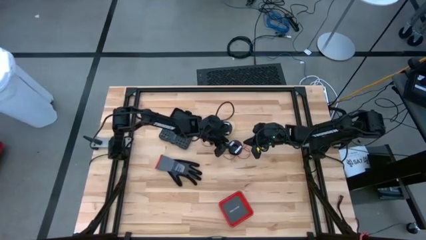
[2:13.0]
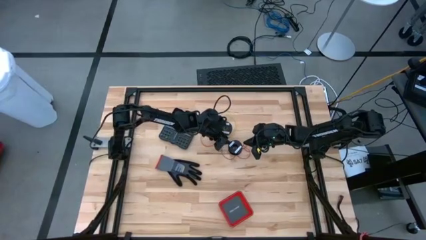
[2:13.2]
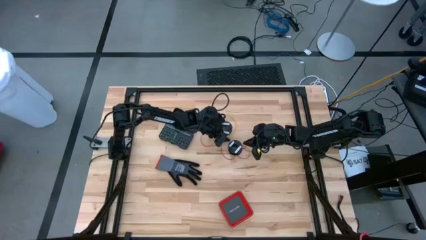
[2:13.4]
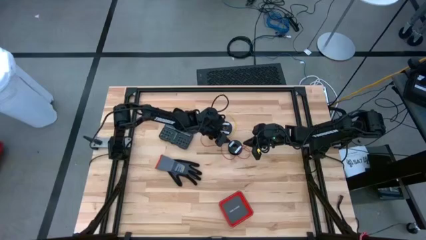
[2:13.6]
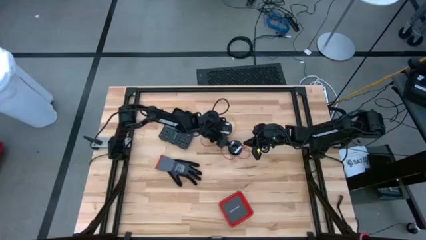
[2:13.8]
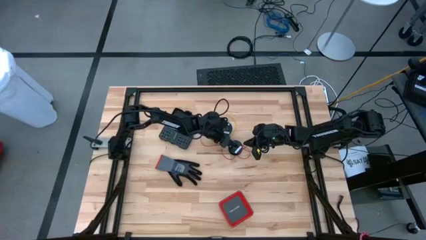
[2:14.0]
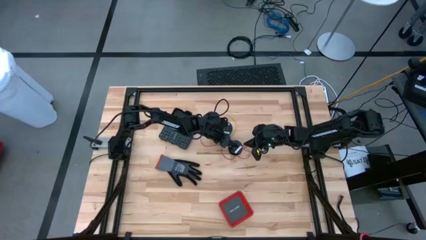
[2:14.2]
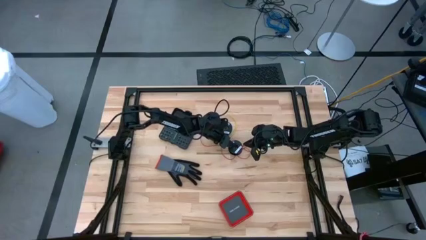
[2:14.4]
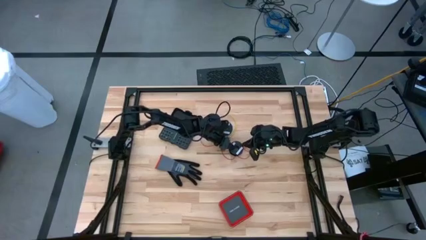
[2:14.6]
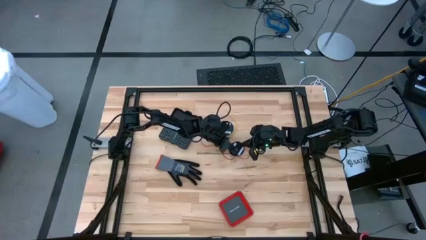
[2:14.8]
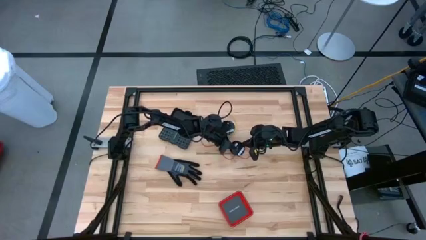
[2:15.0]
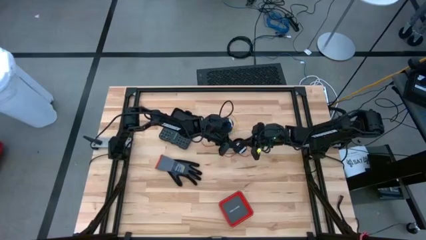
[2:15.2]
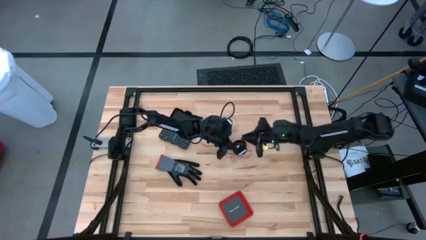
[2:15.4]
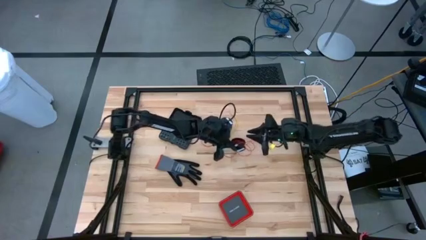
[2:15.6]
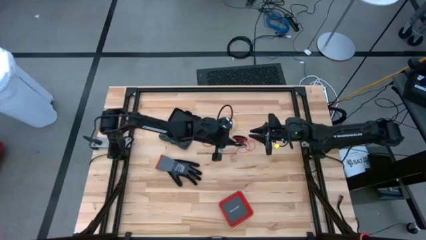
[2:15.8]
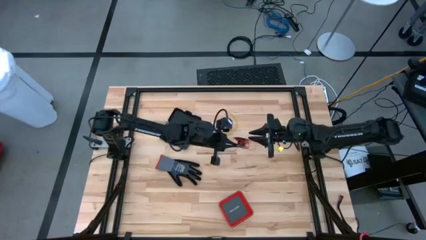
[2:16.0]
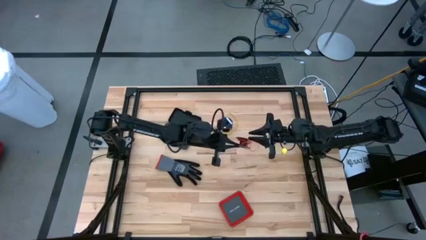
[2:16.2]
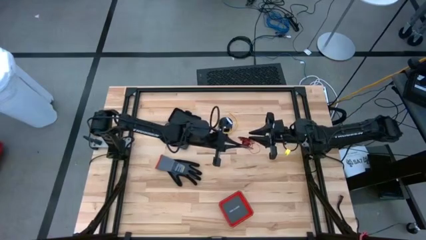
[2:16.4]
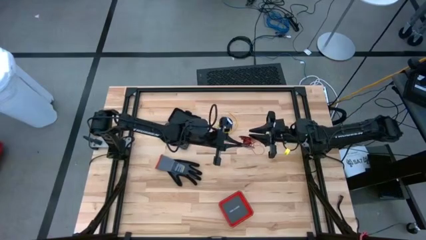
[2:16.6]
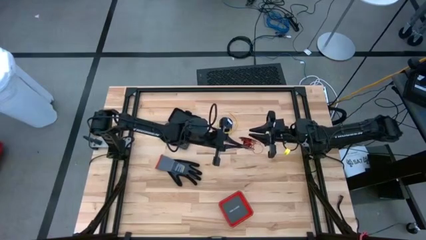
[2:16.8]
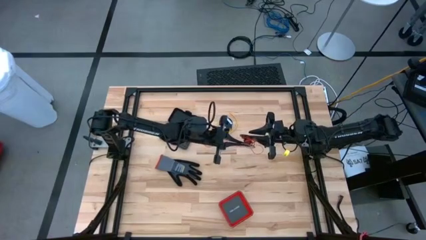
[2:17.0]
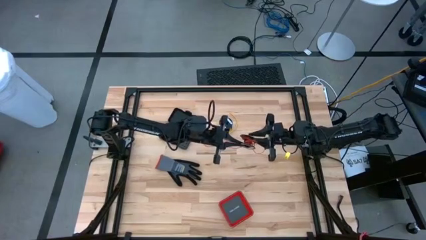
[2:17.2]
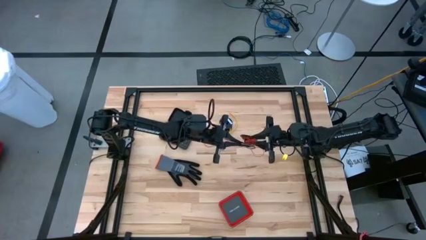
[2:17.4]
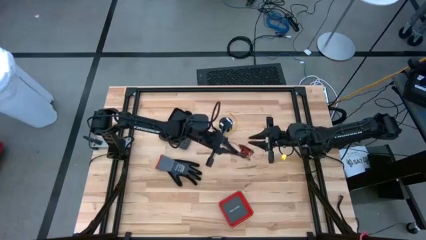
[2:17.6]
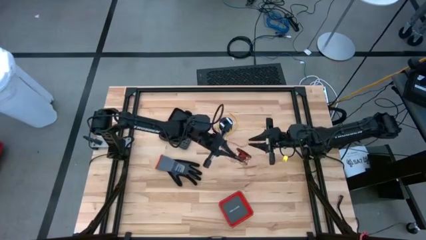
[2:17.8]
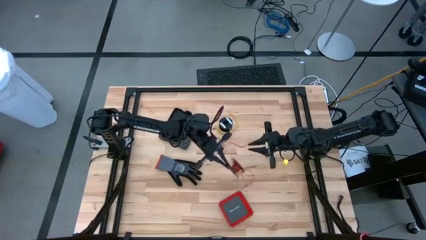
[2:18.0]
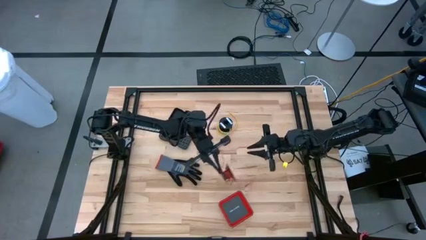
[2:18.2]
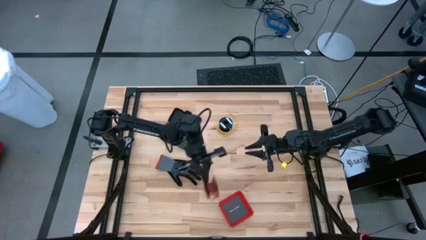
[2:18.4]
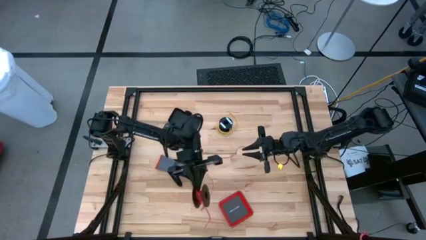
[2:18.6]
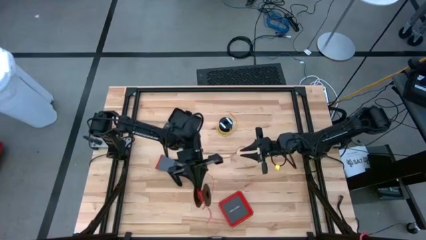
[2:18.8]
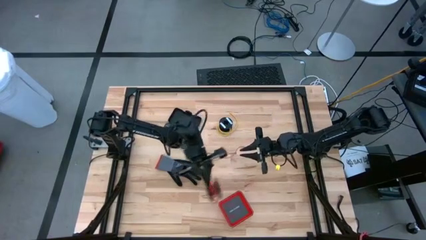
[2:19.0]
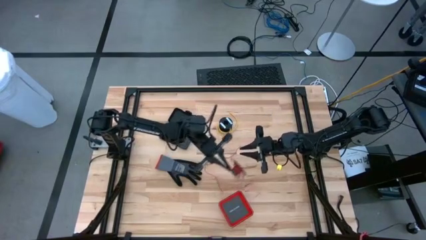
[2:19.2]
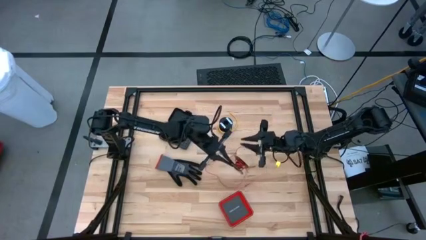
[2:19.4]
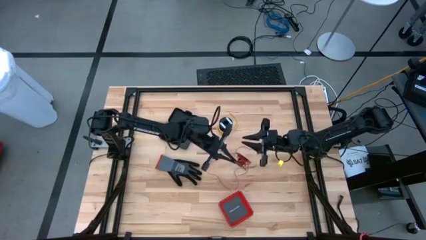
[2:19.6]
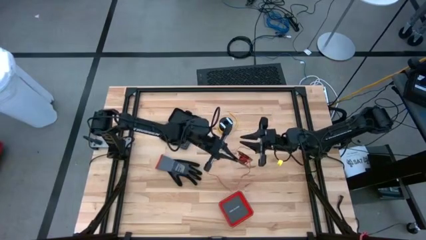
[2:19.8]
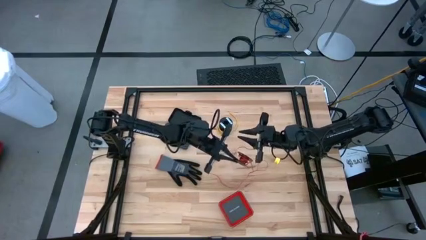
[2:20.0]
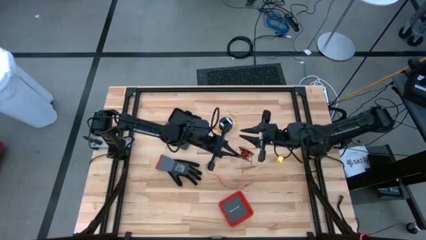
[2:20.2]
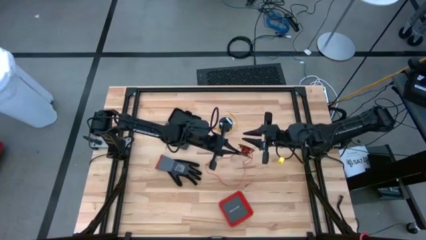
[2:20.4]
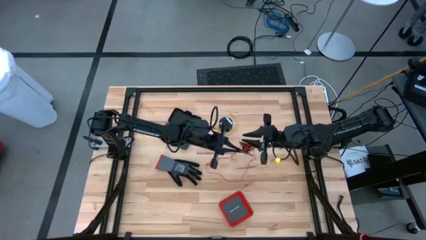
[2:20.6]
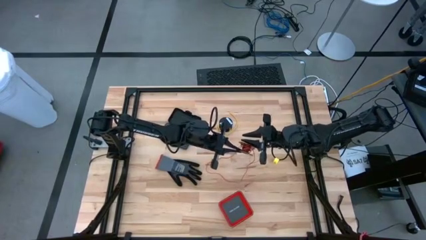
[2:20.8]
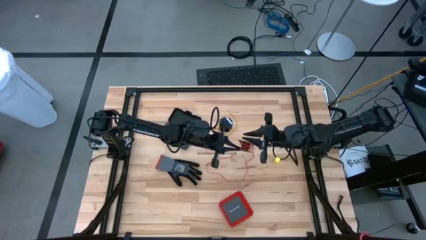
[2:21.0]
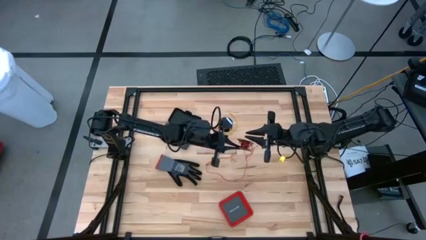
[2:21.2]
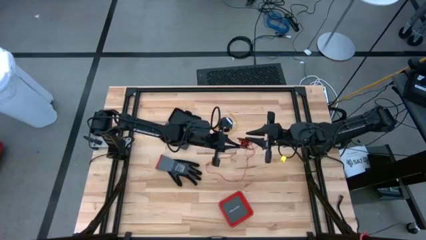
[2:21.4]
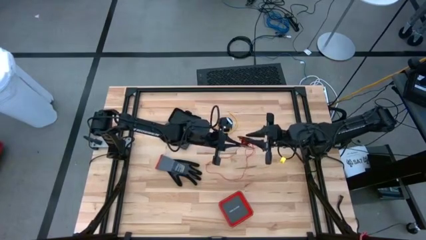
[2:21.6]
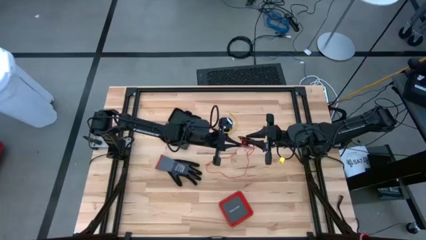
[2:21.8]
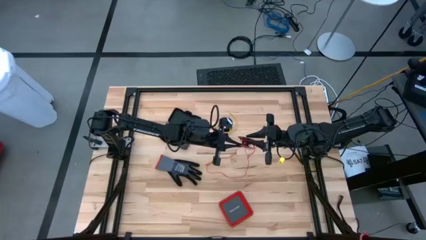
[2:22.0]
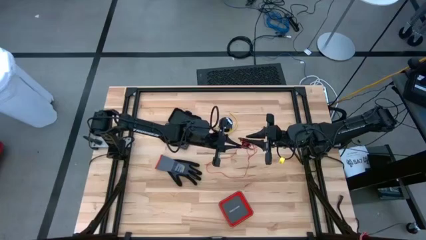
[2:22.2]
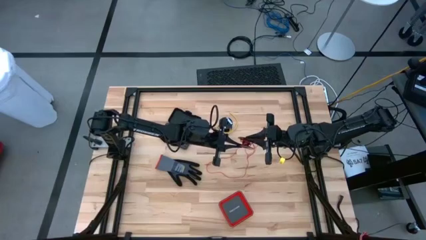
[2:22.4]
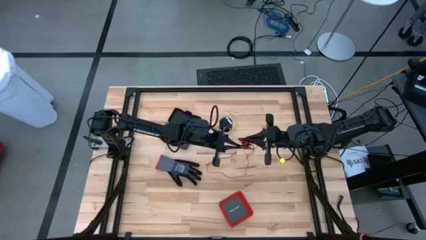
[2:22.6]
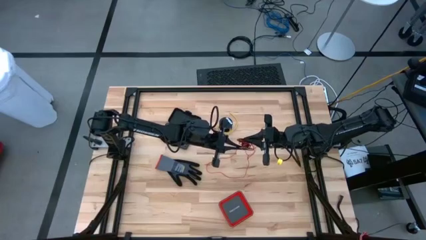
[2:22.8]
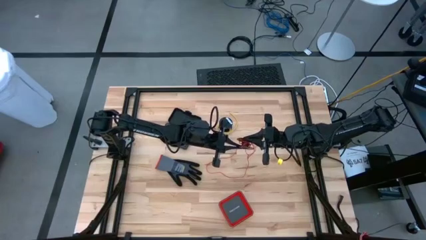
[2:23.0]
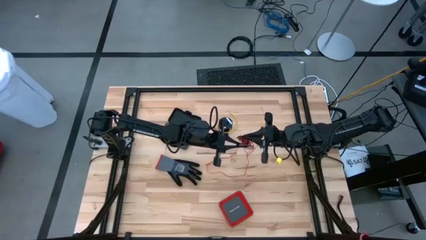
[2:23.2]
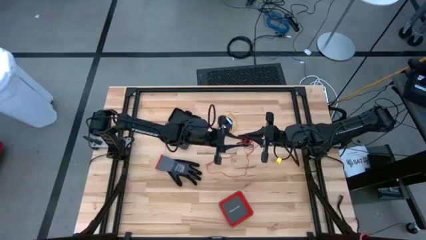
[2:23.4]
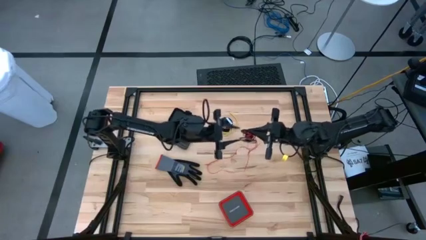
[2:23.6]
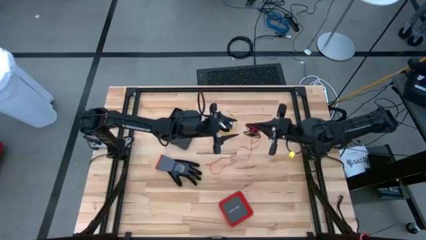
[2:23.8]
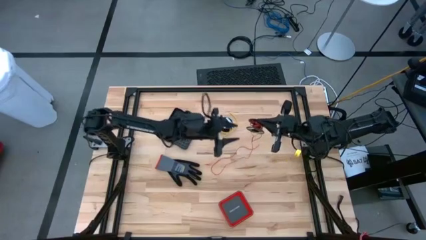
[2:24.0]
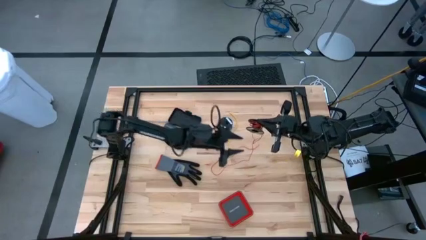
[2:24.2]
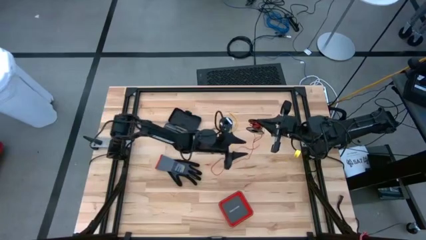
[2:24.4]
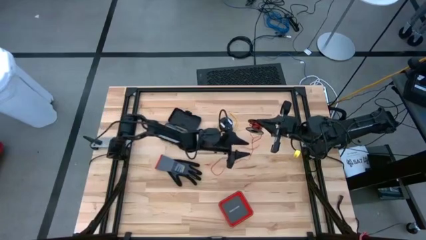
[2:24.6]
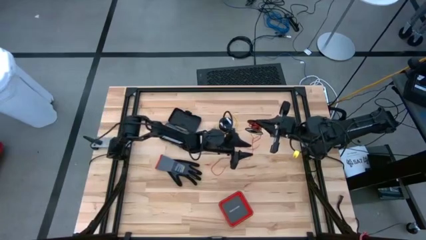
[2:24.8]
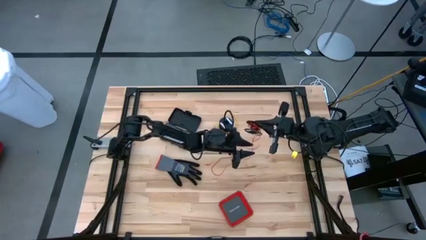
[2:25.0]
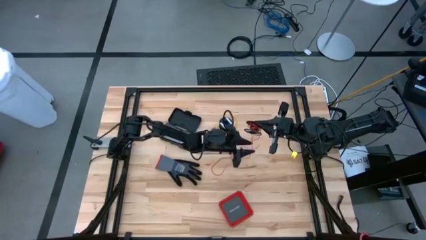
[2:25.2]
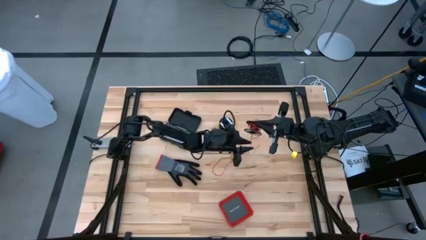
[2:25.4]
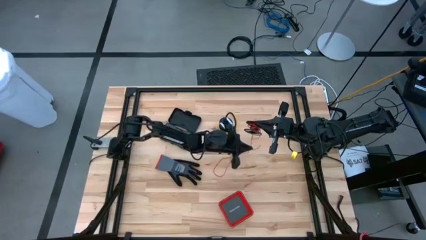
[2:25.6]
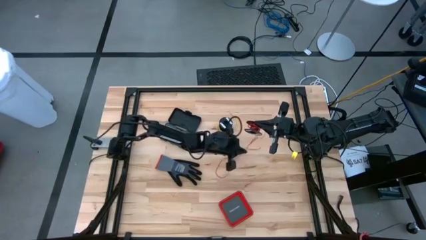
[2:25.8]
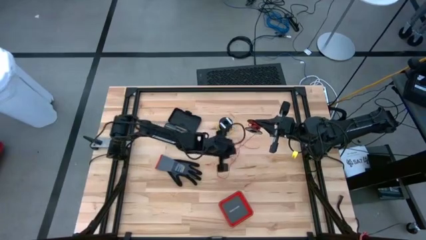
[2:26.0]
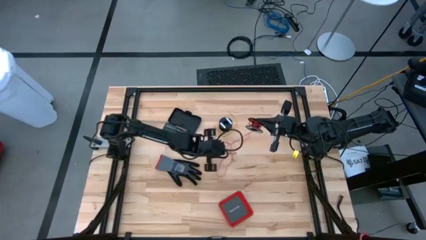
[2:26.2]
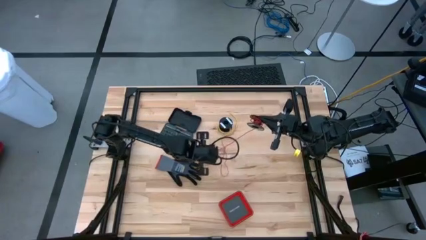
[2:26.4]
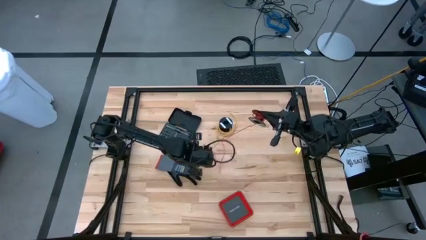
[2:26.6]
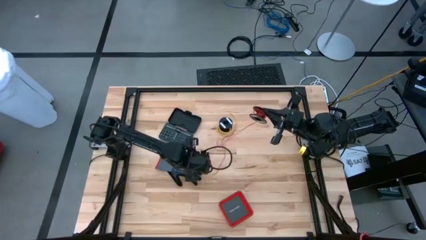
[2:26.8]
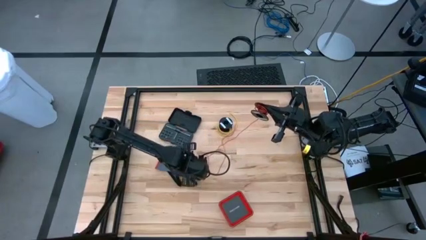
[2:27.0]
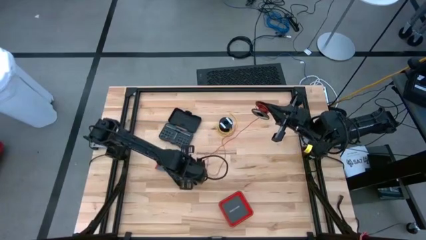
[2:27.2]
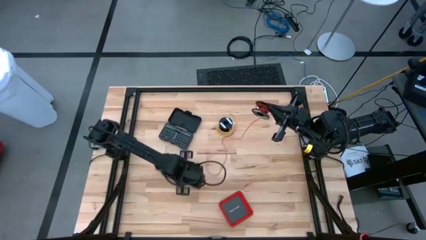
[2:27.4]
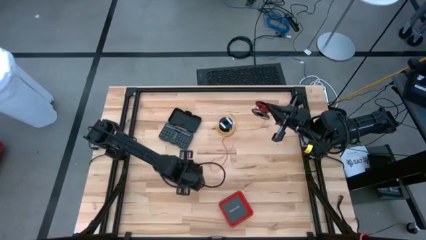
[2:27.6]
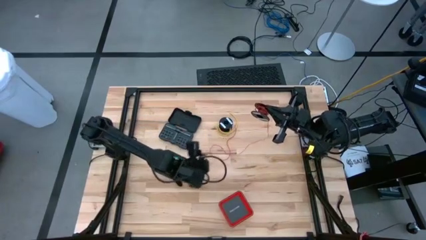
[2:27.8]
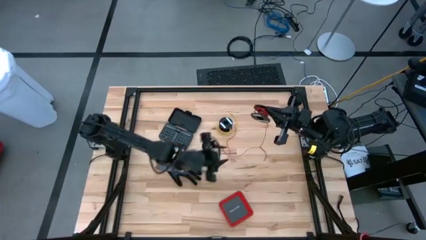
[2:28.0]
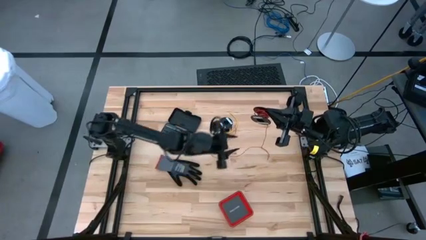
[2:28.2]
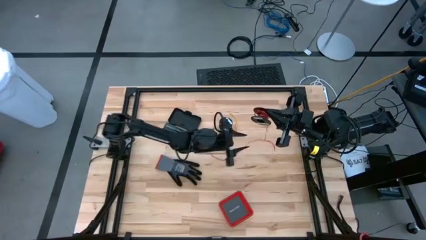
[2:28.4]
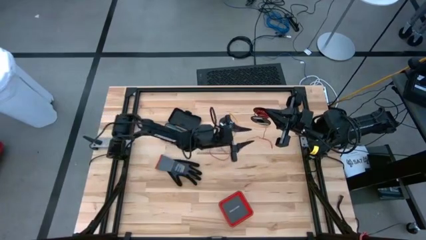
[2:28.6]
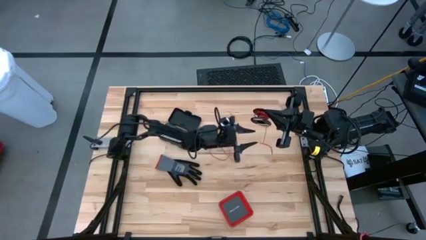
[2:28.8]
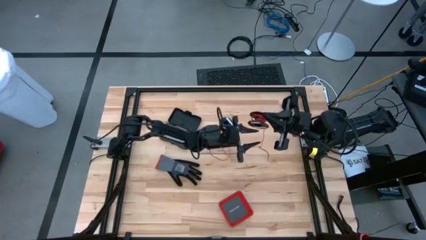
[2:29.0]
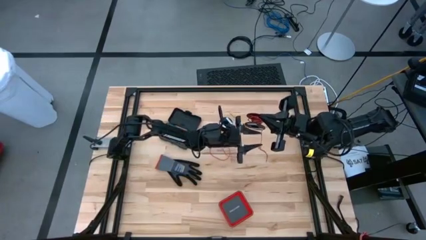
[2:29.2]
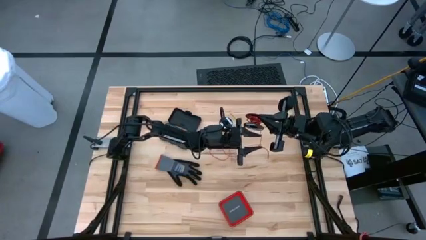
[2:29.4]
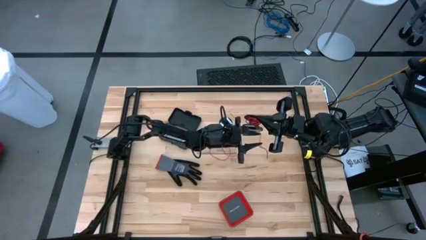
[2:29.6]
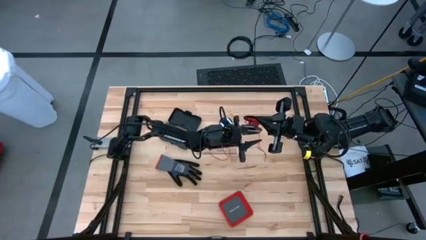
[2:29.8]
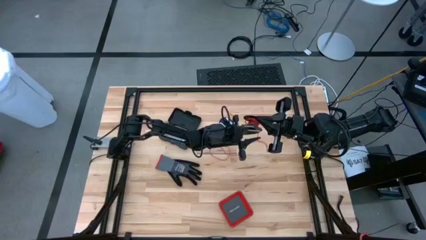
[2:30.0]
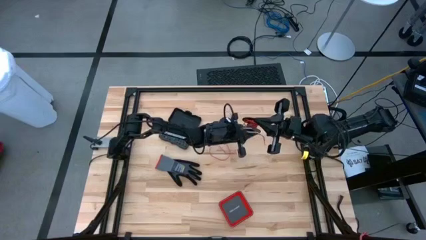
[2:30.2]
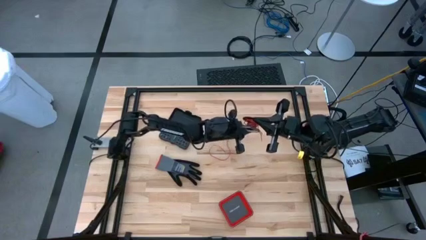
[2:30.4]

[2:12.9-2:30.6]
Task: Coil cords
Coil the red wire onto the spool
